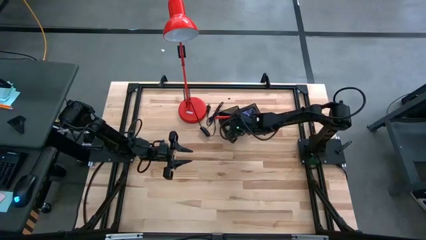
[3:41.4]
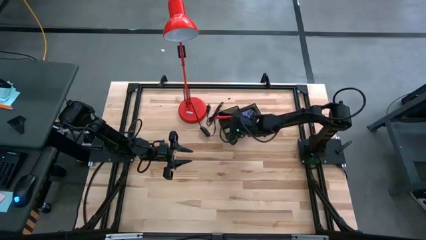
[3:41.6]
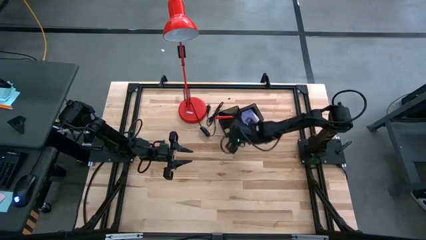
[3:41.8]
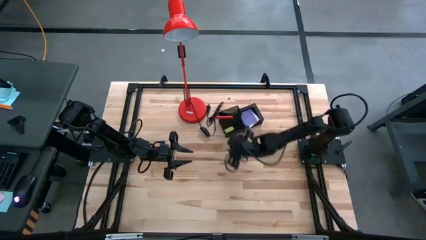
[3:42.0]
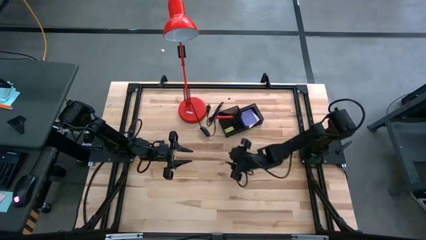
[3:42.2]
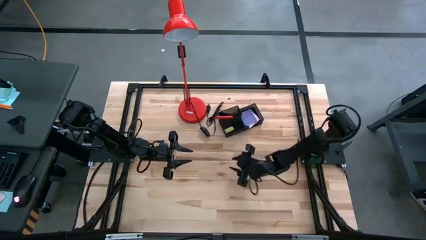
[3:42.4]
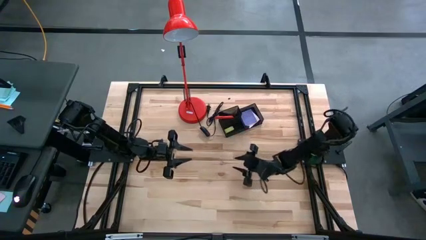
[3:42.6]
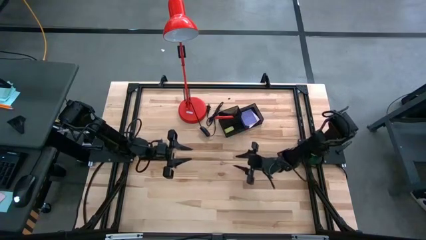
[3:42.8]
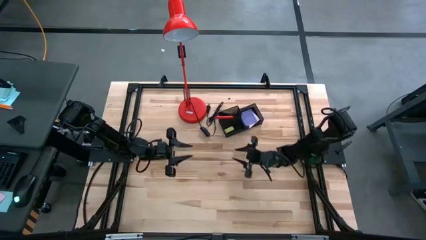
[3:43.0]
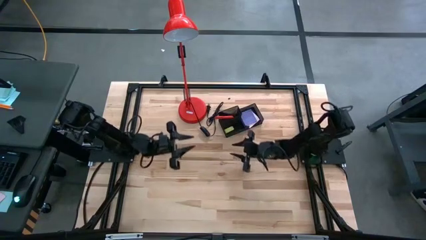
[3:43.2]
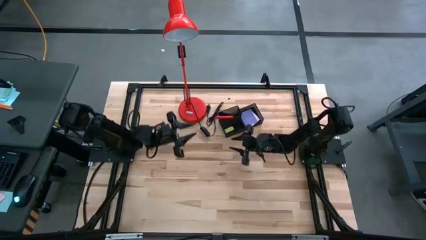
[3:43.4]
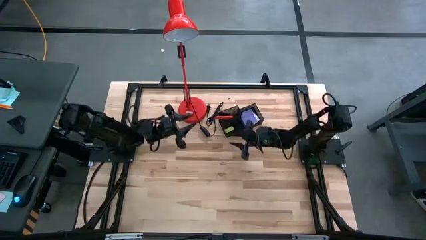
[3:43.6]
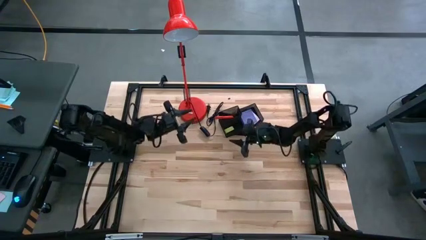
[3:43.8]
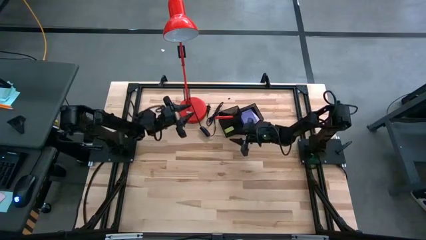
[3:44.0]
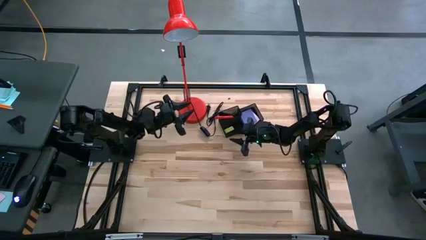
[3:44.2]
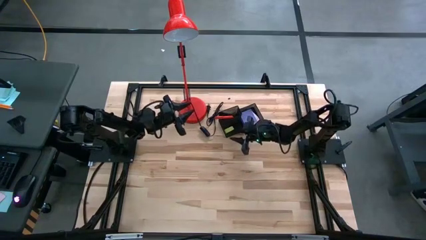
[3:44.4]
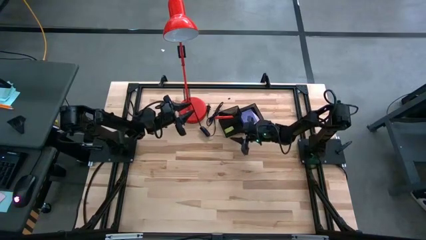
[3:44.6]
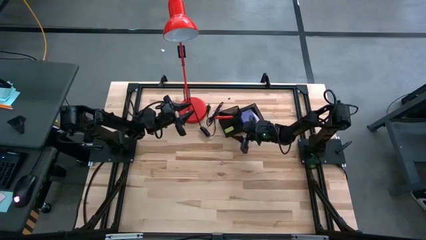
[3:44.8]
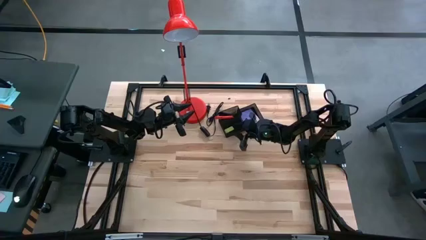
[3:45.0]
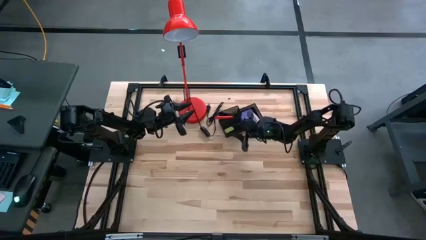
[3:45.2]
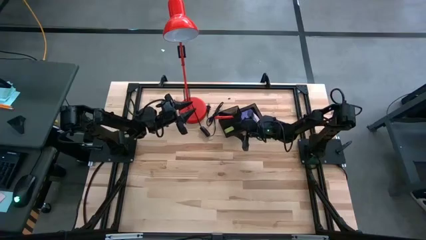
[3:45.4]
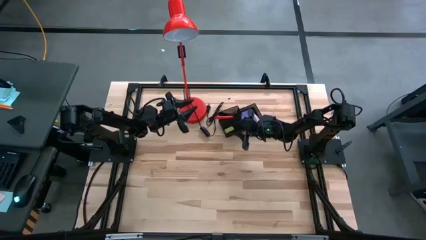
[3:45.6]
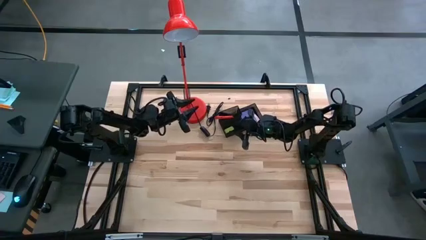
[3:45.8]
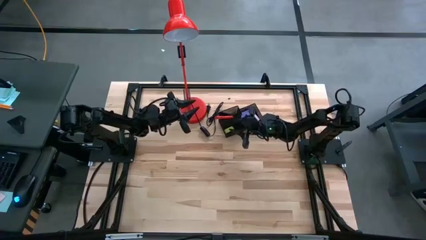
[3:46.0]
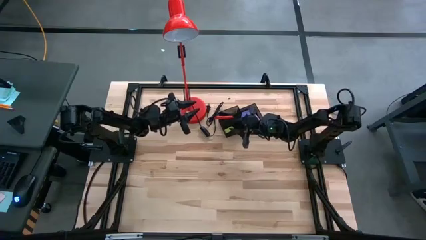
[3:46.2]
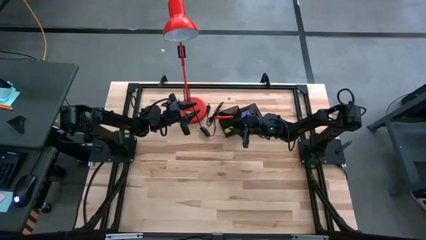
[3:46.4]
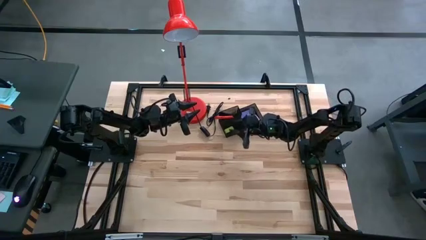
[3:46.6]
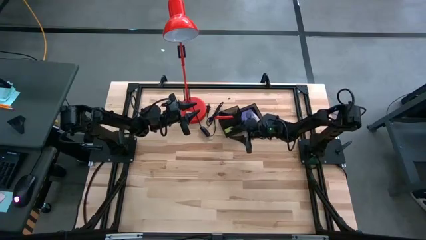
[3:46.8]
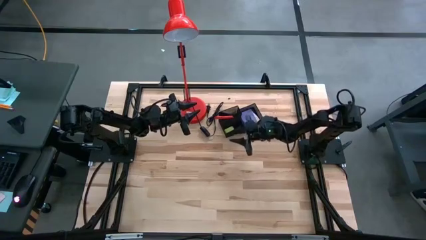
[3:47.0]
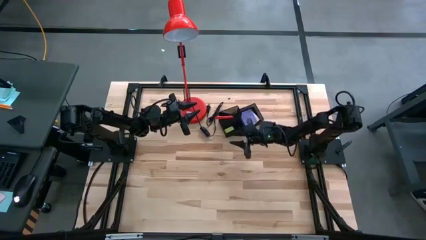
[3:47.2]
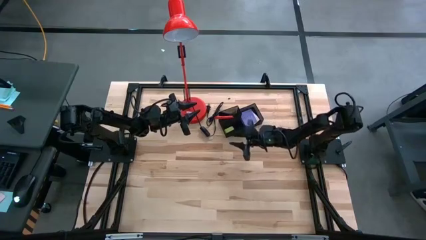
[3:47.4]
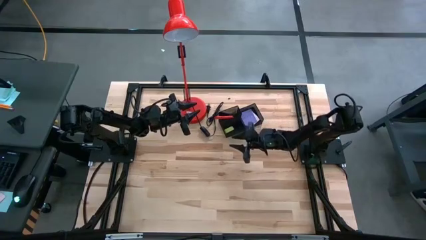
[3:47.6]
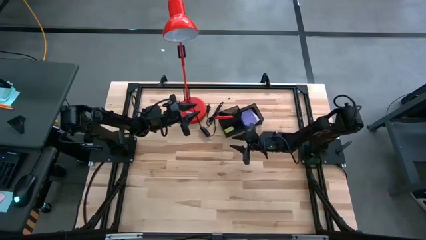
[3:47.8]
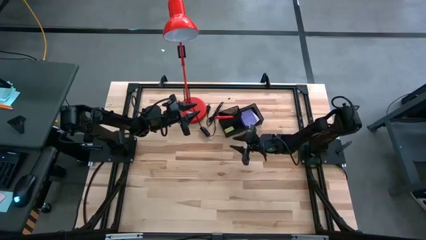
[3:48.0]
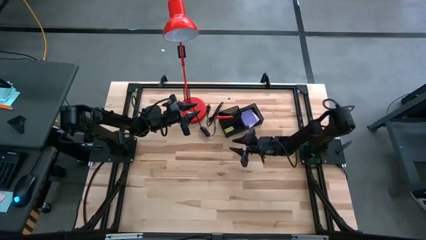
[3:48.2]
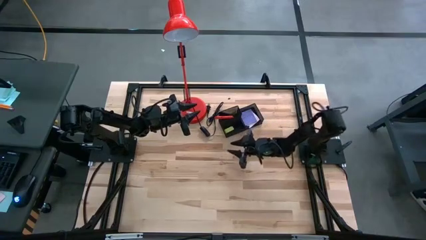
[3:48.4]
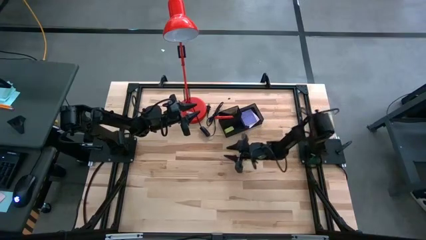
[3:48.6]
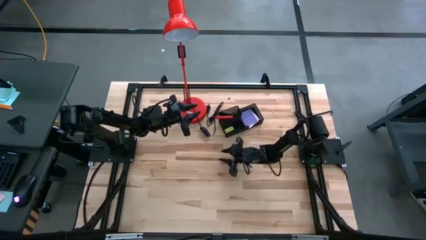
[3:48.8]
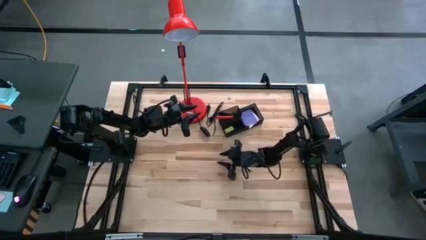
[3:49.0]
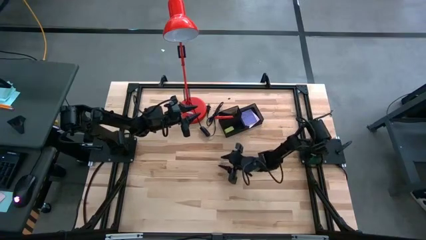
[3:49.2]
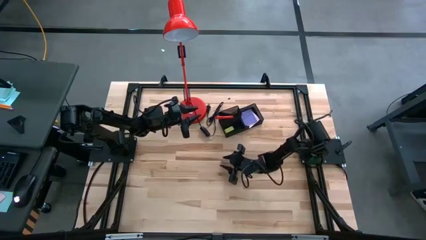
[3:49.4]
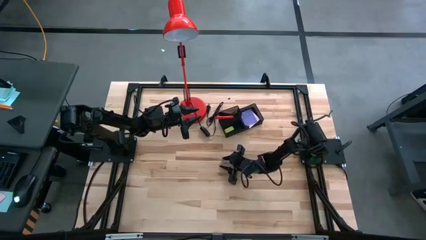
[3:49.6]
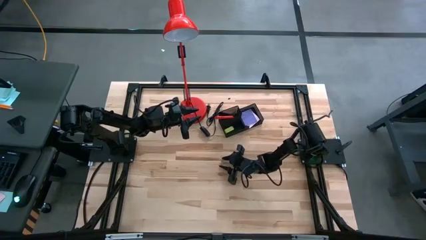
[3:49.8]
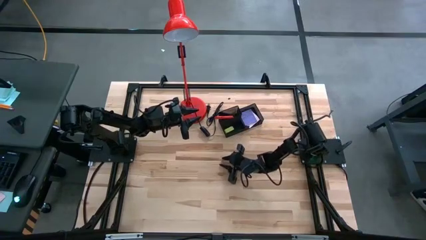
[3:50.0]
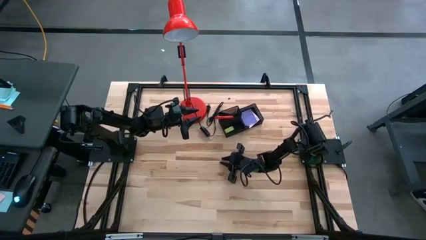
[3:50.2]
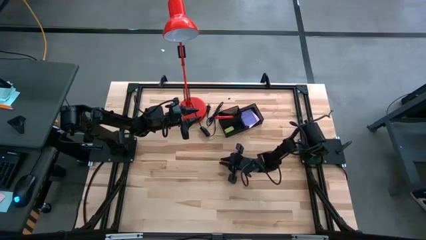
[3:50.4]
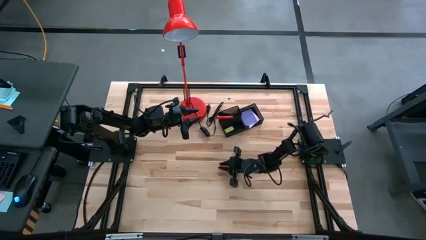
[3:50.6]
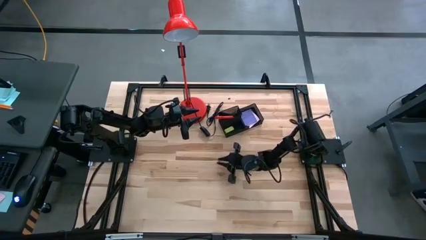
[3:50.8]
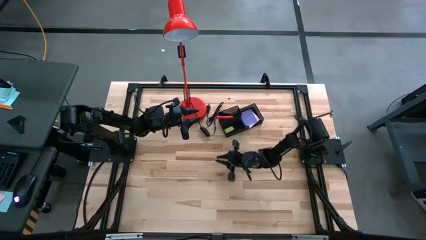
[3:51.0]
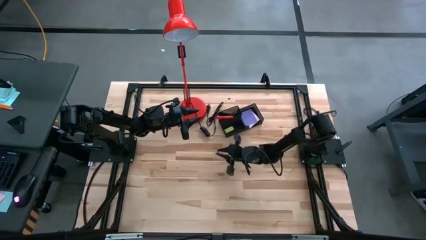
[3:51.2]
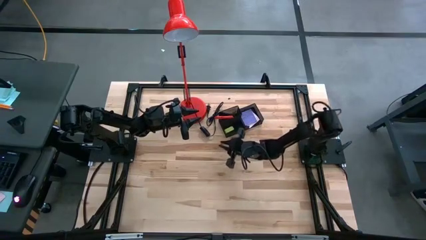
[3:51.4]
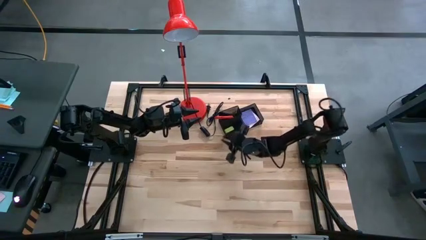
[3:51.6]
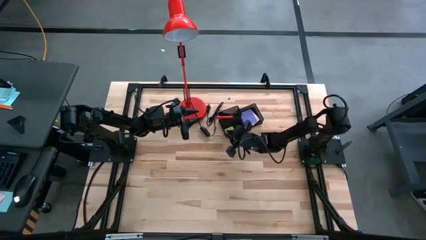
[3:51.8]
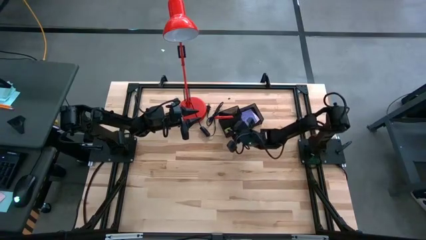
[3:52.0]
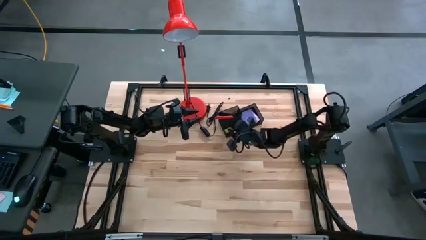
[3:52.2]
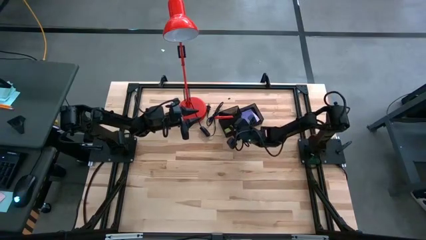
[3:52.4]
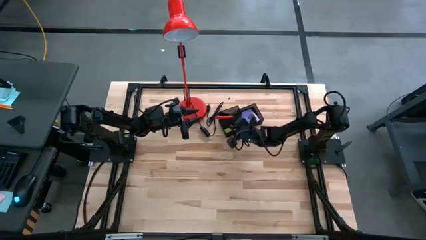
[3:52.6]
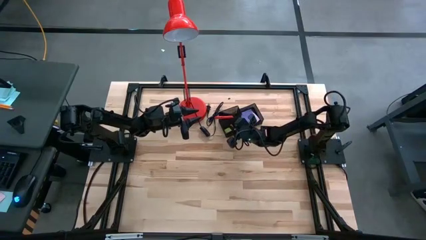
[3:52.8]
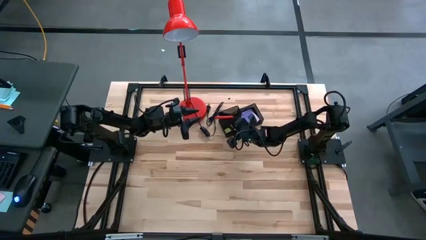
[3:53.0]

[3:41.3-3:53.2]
Task: Pick and place office supplies into organizer
Put the pink binder clip into the black desk organizer
